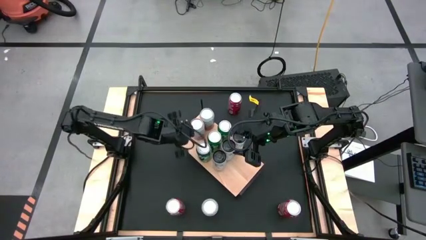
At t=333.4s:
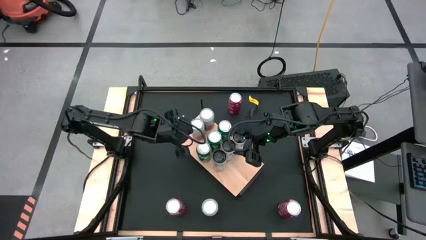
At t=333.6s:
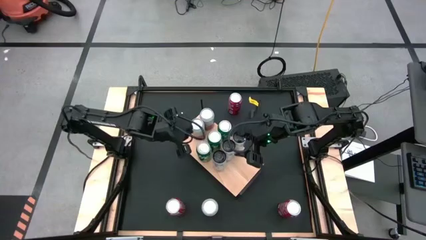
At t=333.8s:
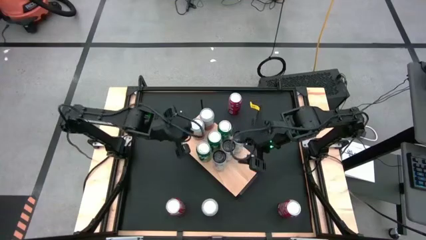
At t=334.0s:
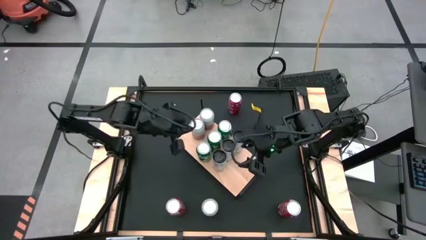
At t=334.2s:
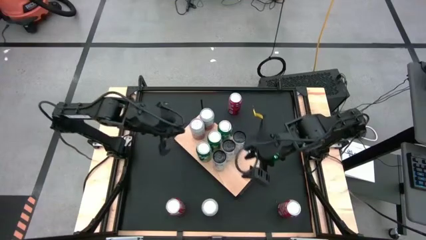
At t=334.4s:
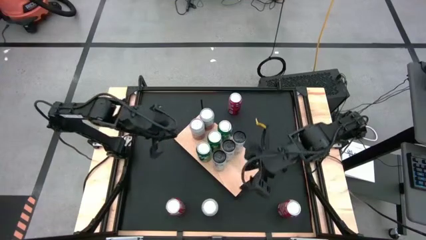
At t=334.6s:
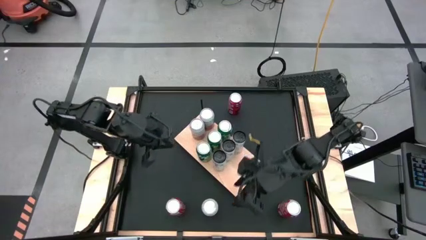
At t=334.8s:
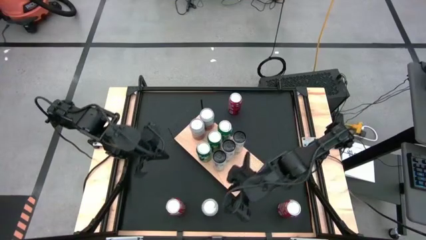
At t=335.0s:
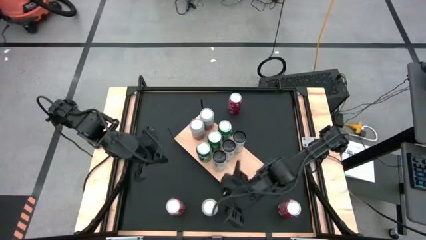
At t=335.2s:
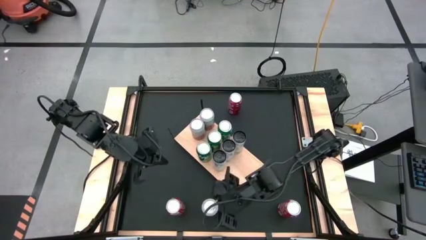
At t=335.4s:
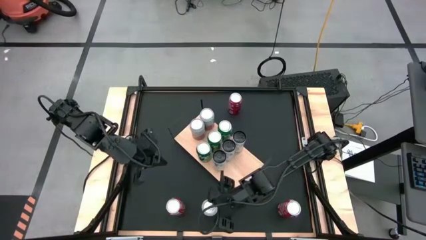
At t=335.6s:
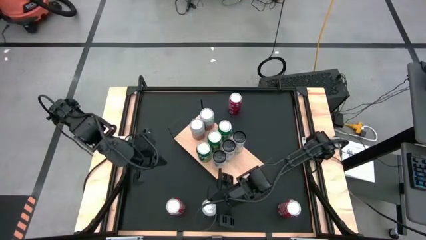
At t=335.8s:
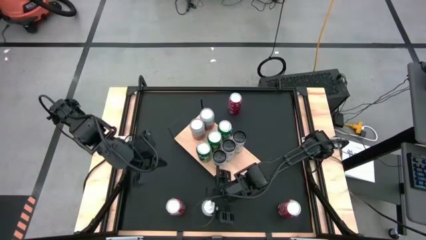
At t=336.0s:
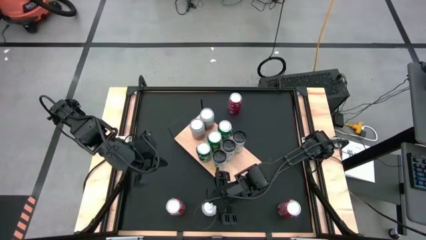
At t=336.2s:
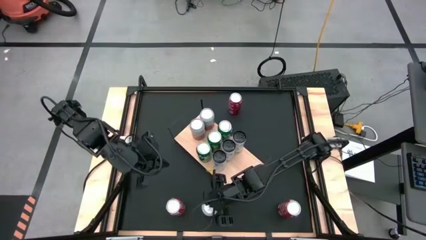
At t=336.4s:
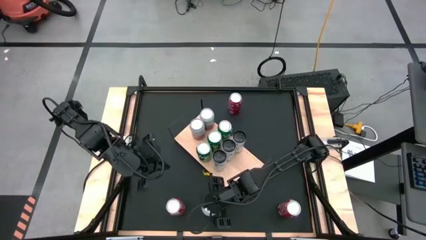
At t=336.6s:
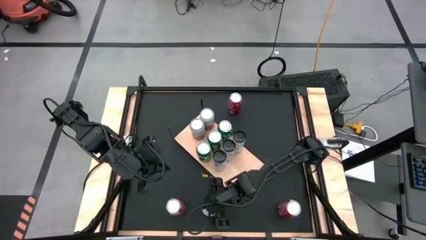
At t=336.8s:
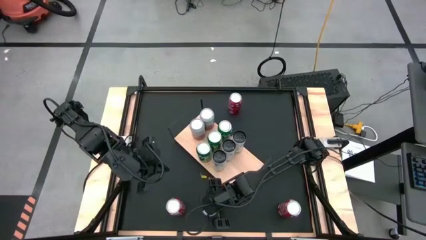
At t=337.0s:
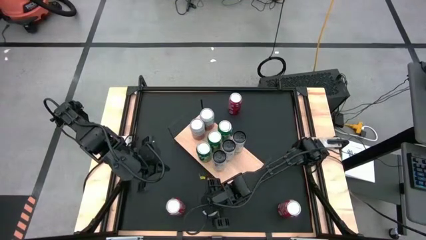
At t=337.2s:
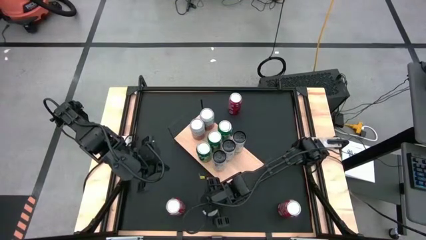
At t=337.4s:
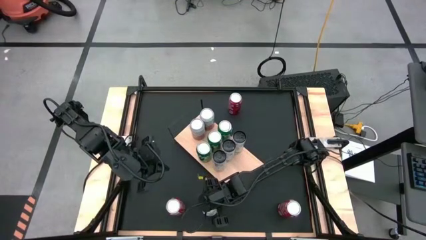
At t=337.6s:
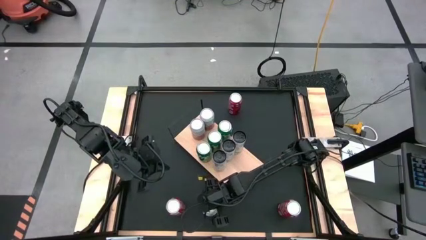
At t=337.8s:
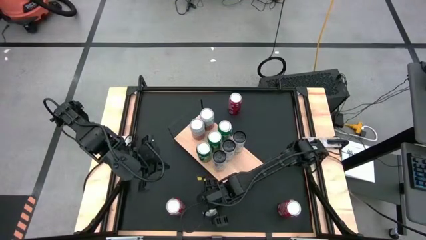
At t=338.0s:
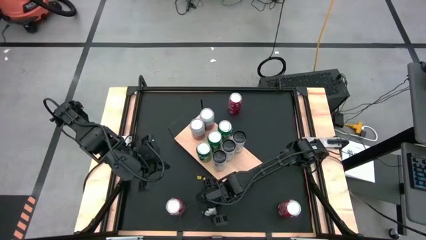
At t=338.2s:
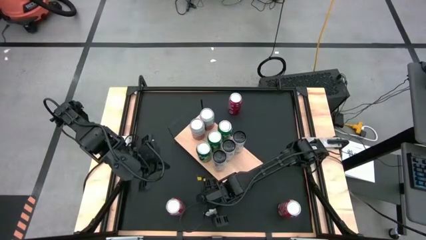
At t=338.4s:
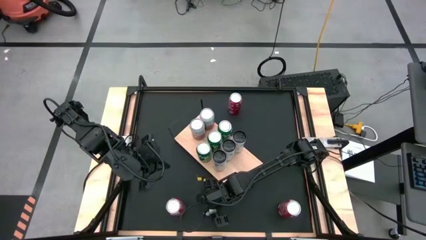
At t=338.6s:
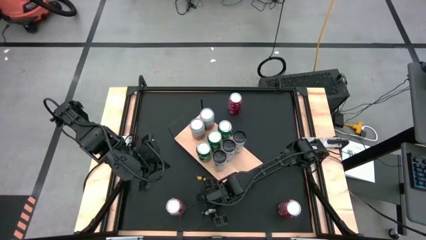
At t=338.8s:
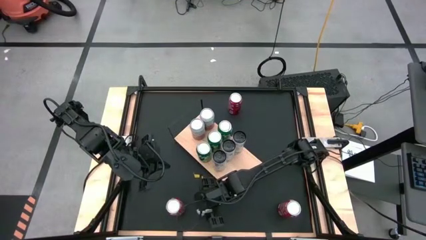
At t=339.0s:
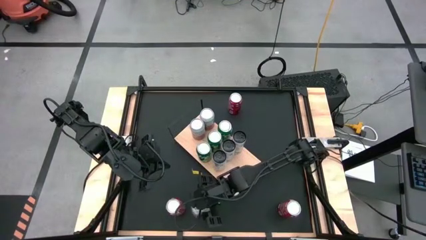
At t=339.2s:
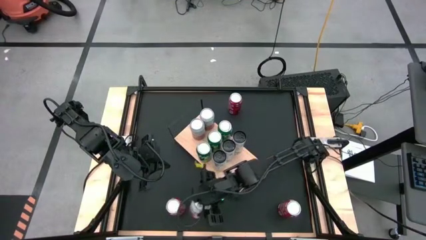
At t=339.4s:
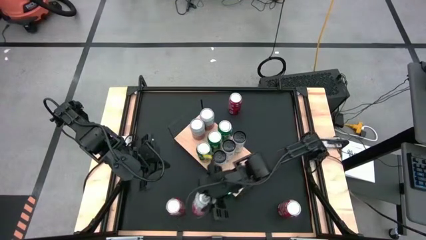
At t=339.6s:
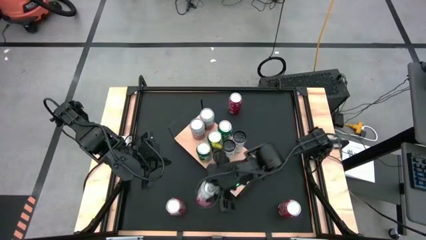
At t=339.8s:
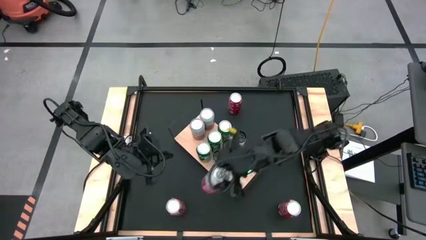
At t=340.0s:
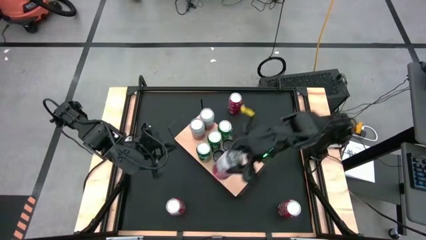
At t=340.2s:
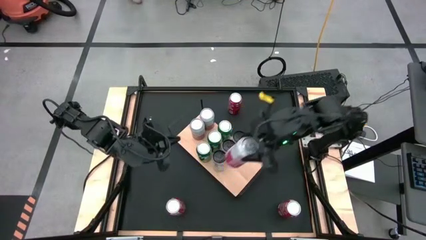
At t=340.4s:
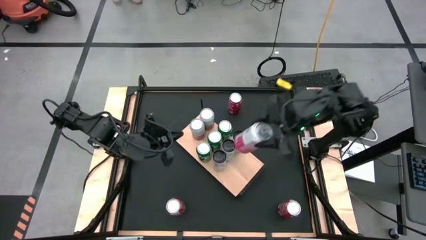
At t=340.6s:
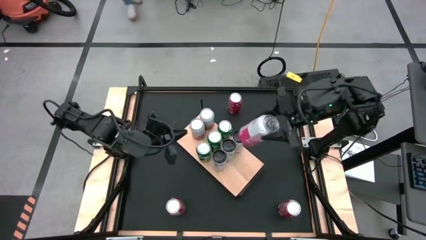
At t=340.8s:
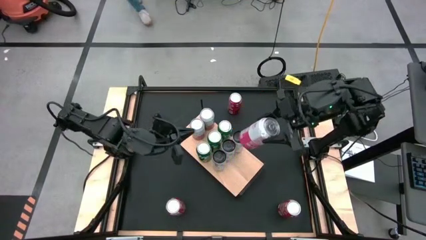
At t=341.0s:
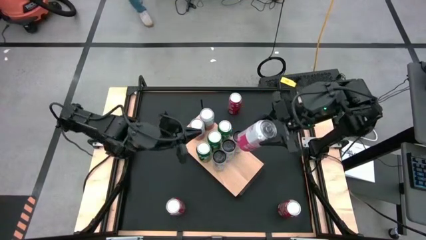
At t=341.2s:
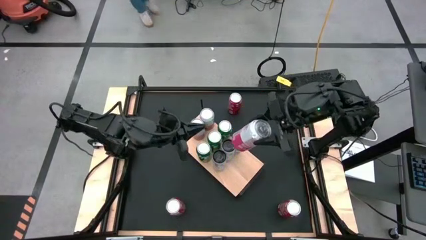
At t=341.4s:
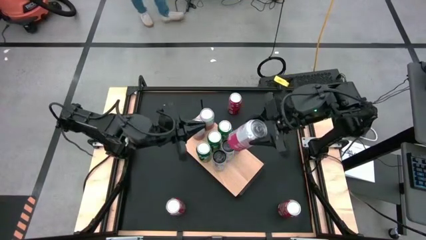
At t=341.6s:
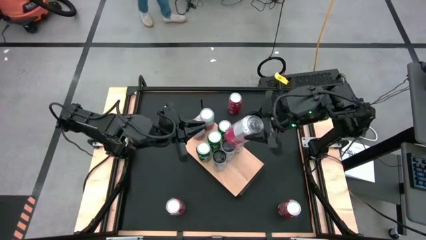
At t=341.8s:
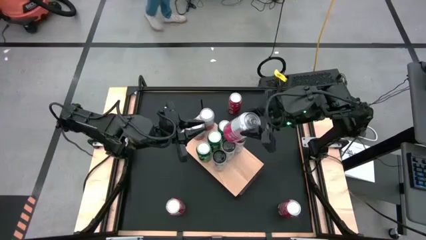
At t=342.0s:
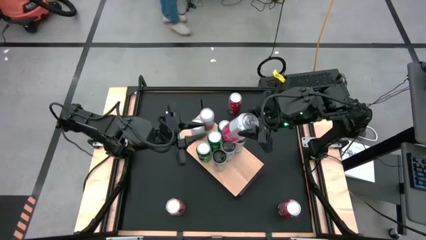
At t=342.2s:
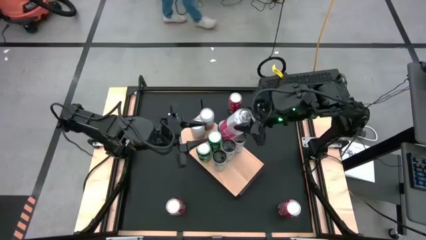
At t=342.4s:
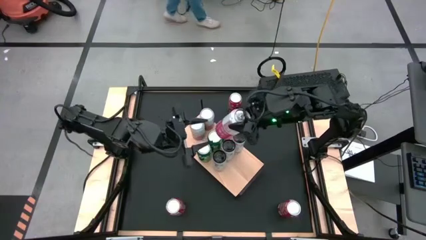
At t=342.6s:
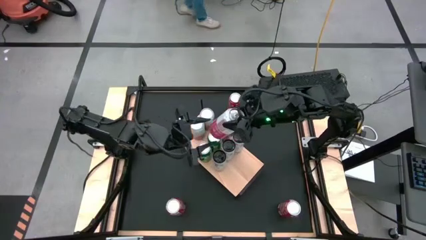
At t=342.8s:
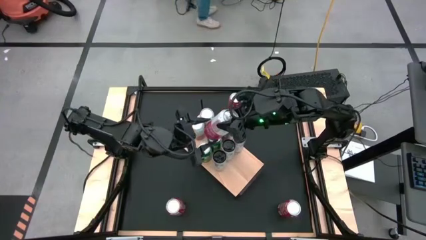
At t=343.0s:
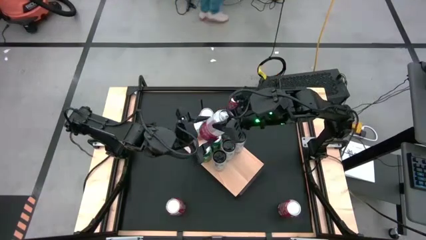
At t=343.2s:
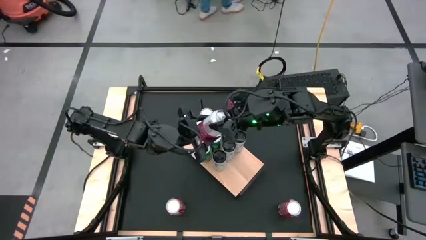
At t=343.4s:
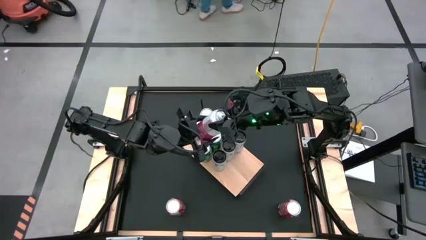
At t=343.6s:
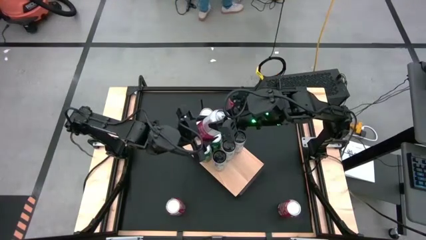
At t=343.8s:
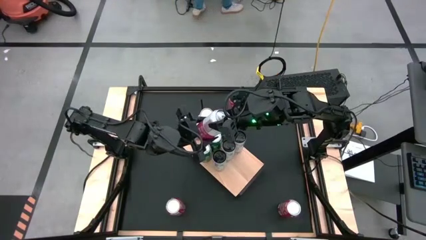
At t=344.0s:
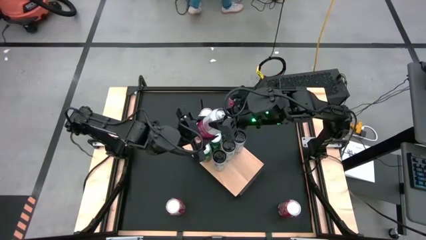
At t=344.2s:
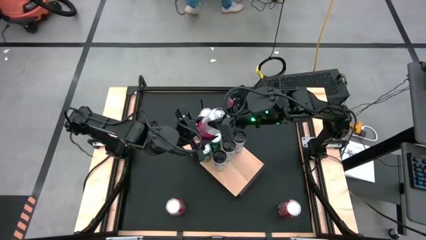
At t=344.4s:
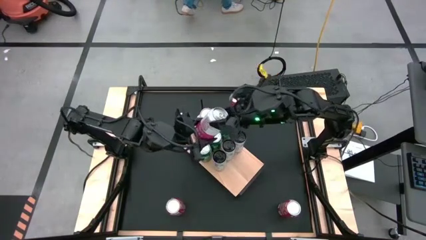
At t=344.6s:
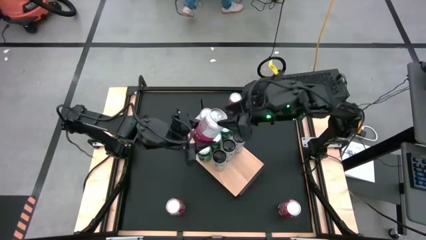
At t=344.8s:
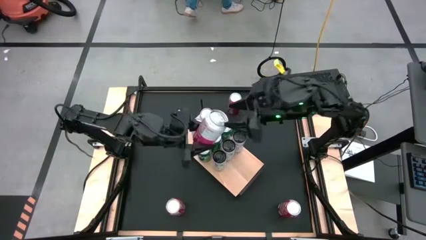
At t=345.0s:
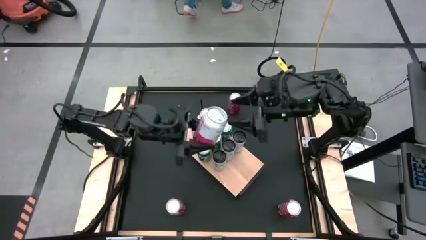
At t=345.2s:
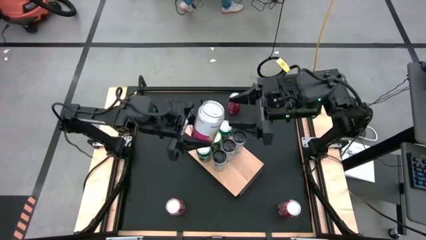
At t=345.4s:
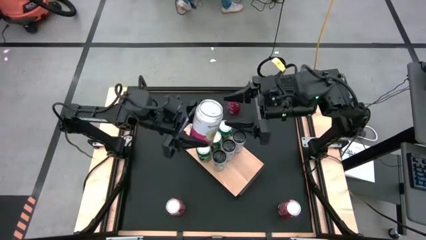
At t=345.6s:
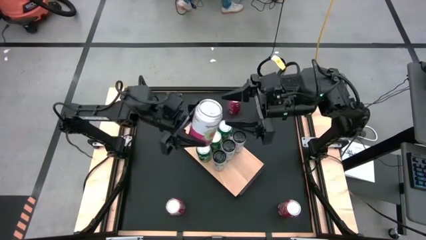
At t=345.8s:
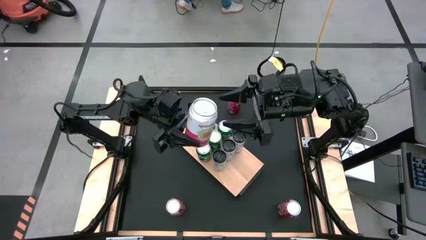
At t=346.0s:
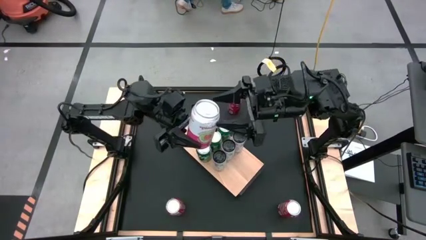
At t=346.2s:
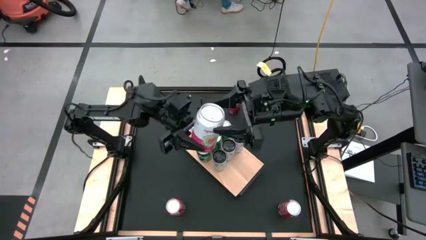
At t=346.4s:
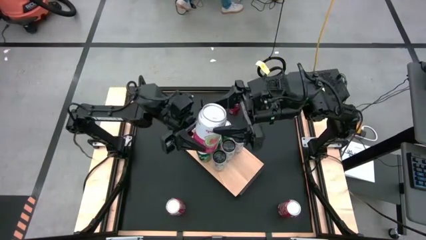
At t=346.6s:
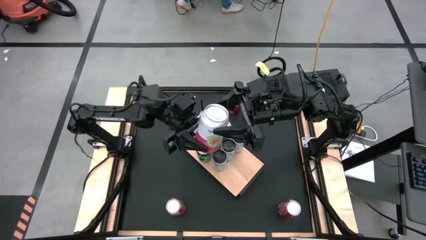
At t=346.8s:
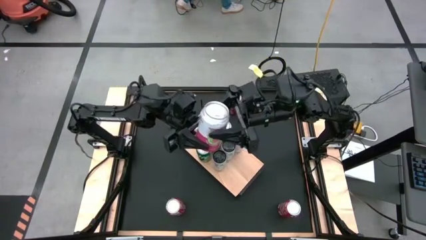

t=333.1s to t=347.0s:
Task: Place canned beverage on shelf
Put the white and pink soda can aligned with the other white and pink soda cans
